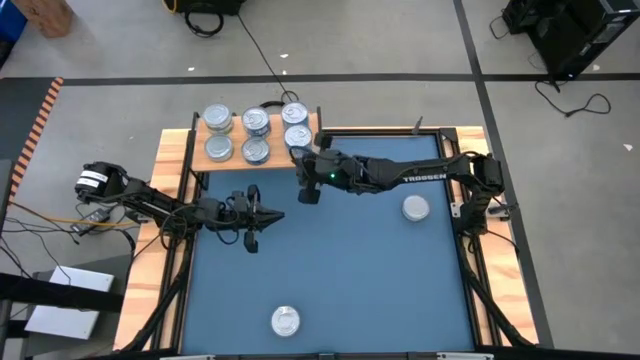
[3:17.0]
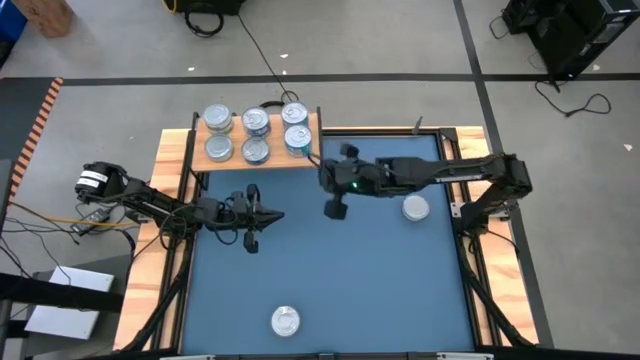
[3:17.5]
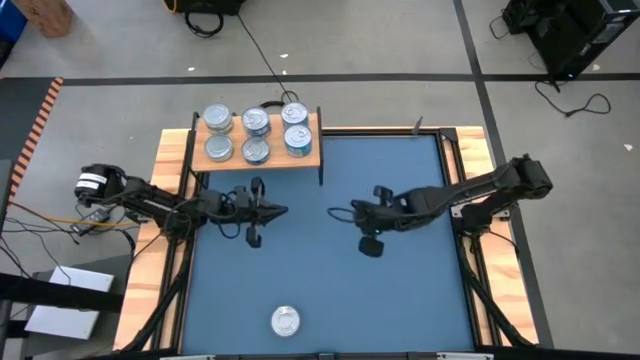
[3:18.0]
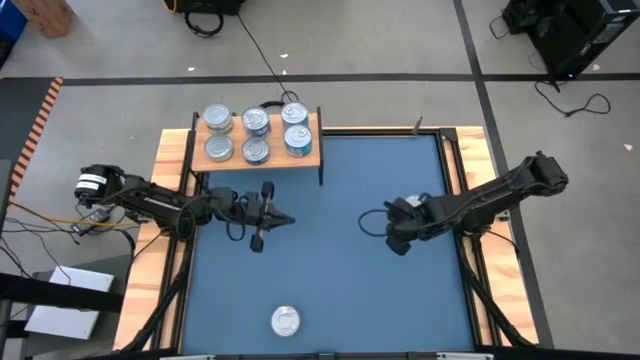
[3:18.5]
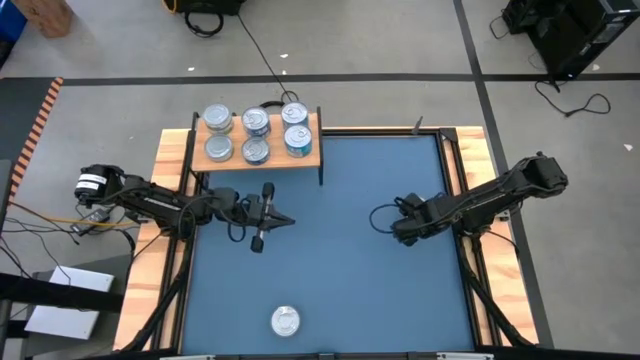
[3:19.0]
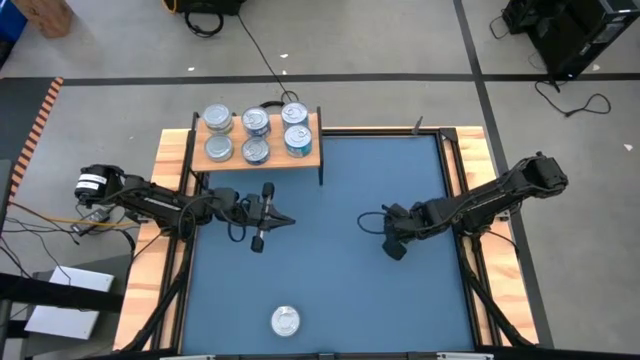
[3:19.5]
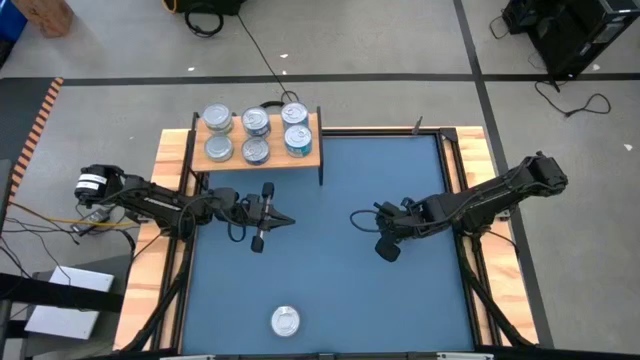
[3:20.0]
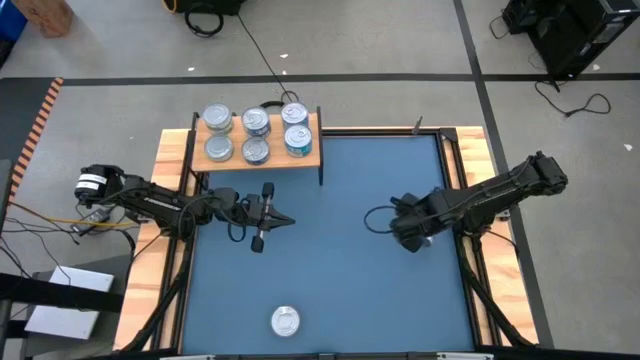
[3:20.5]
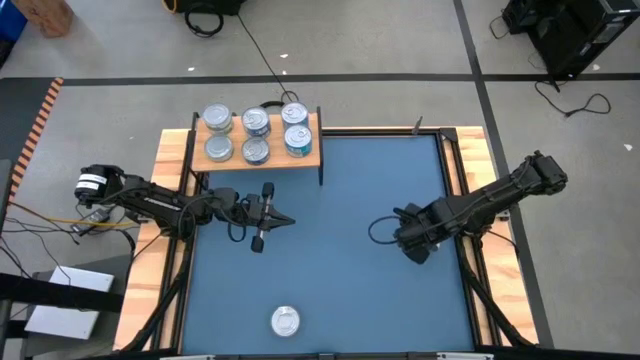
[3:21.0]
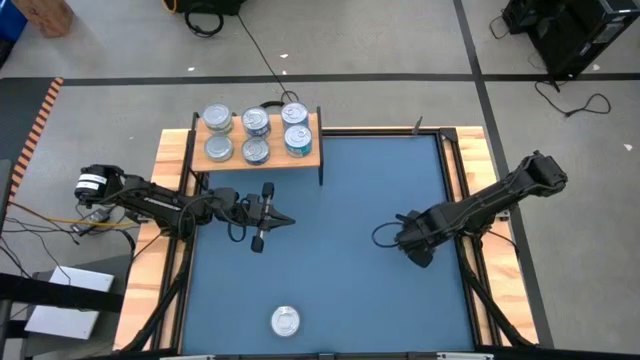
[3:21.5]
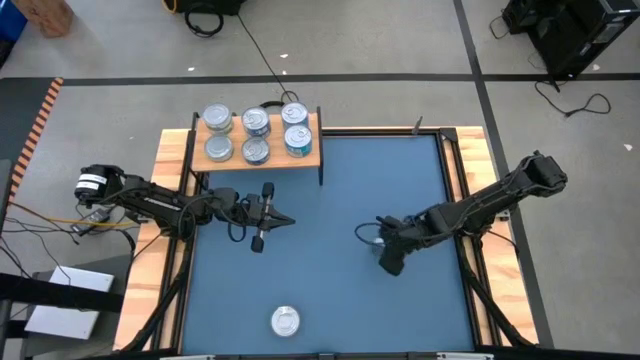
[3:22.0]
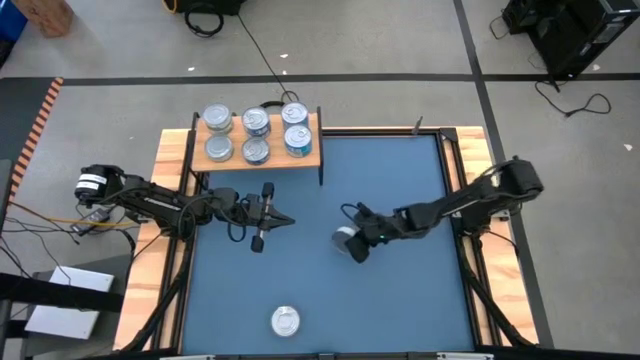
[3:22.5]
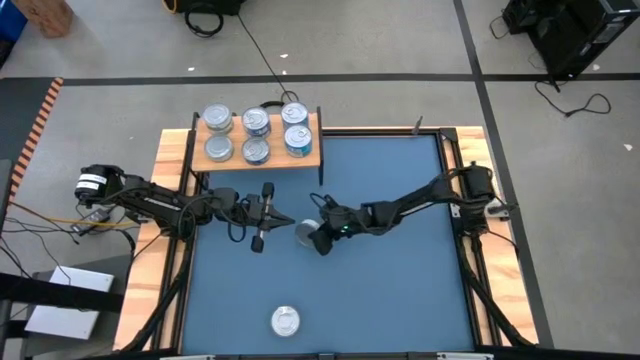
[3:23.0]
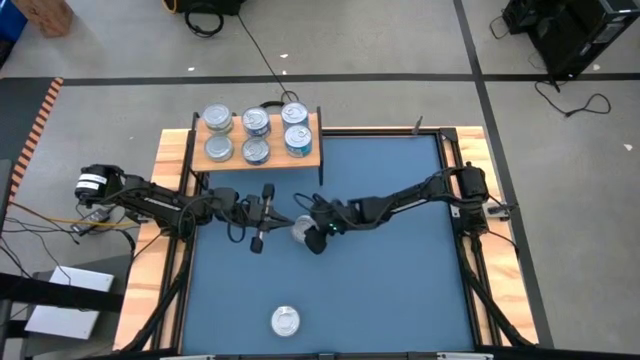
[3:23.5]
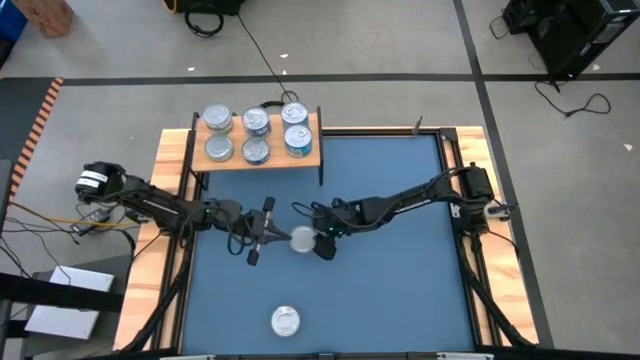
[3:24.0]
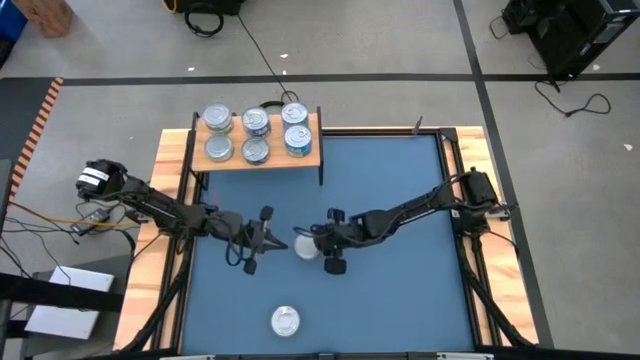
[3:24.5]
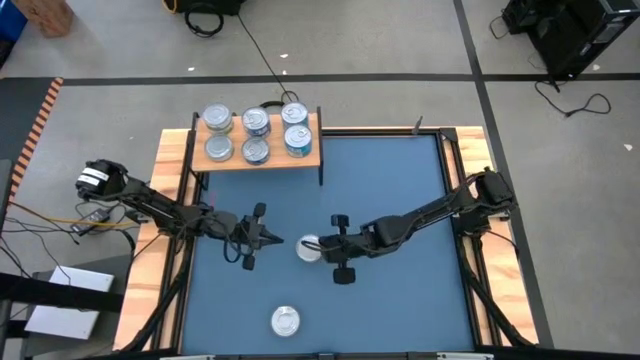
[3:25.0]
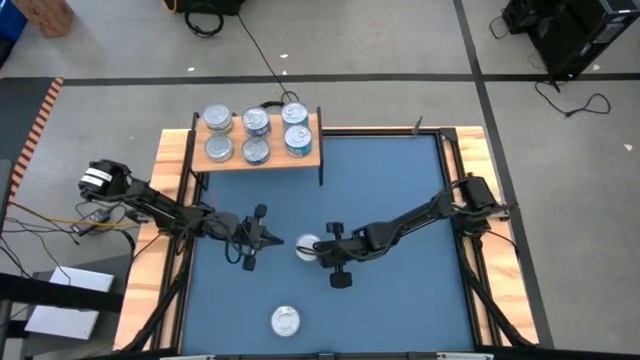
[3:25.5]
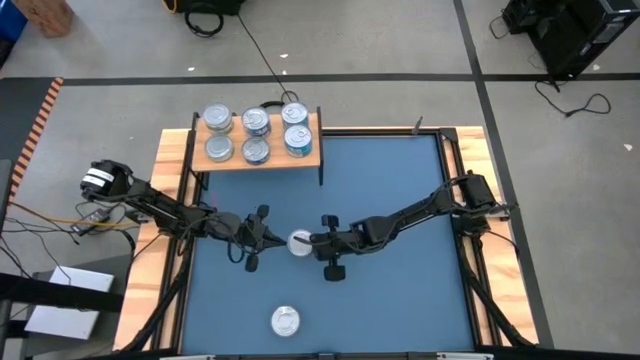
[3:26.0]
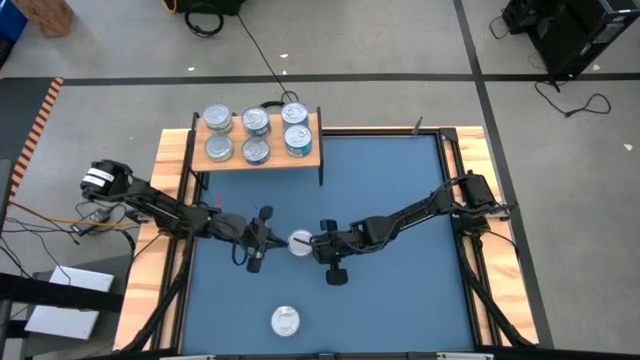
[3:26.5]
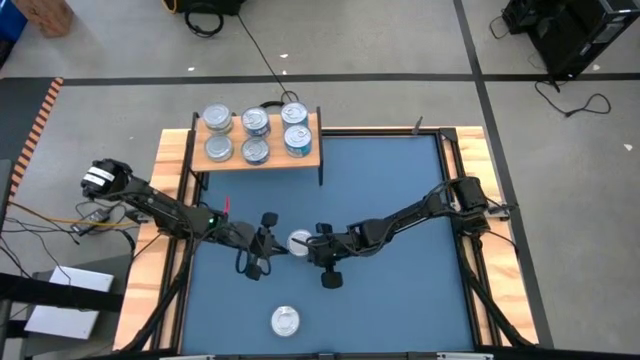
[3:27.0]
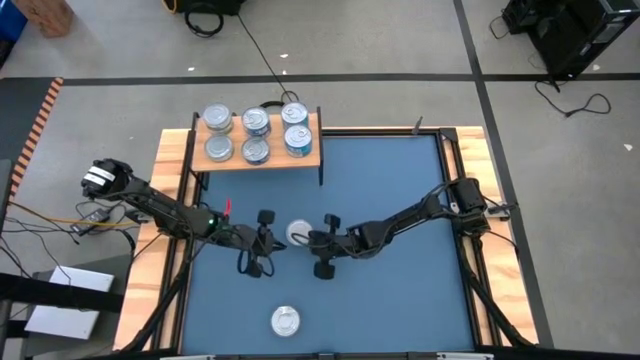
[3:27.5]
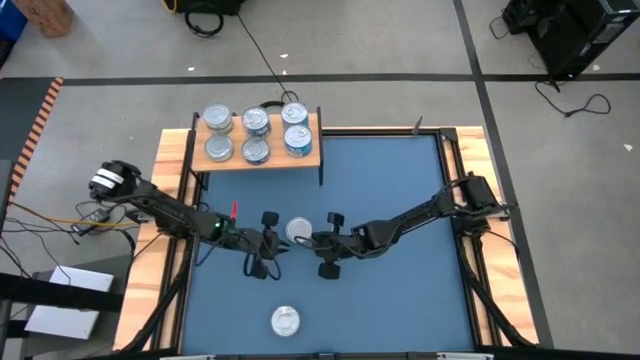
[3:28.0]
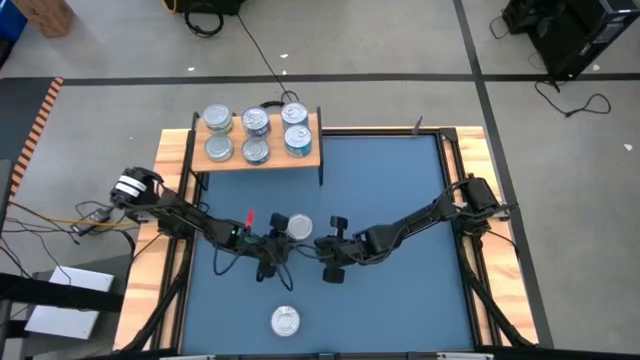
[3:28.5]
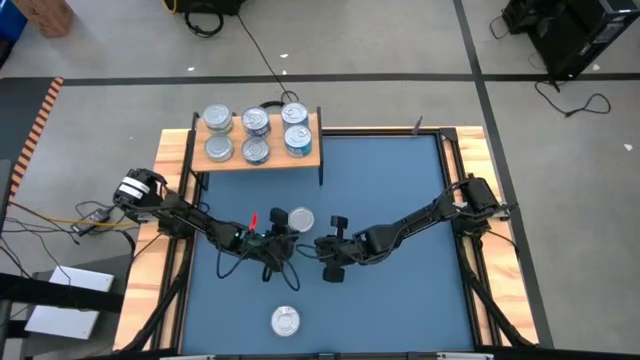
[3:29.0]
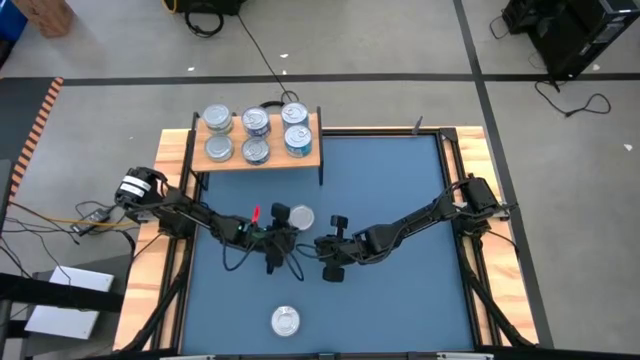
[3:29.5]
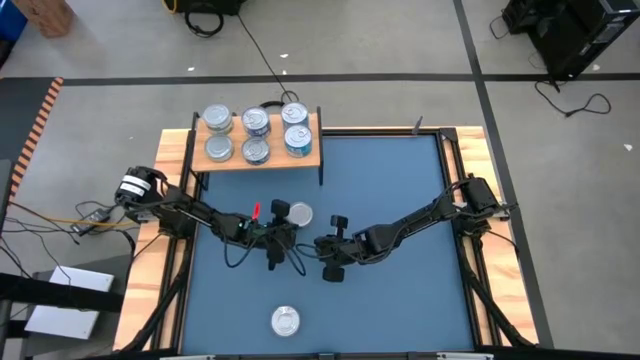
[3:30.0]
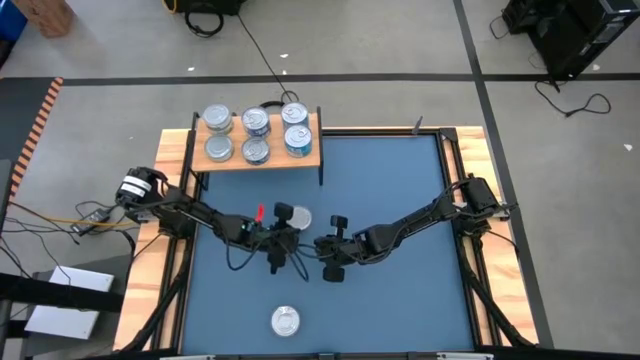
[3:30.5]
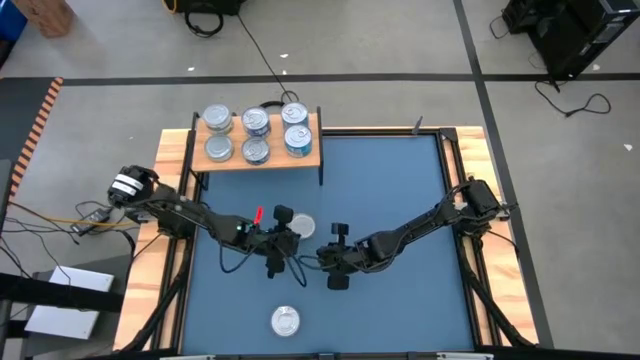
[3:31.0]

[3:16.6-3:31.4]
Task: Stack canned seafood by type on shelf
Stack the green white tuna can on top of the green white tuna can on the shelf

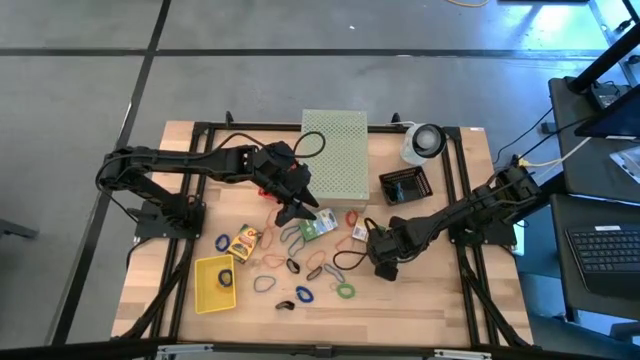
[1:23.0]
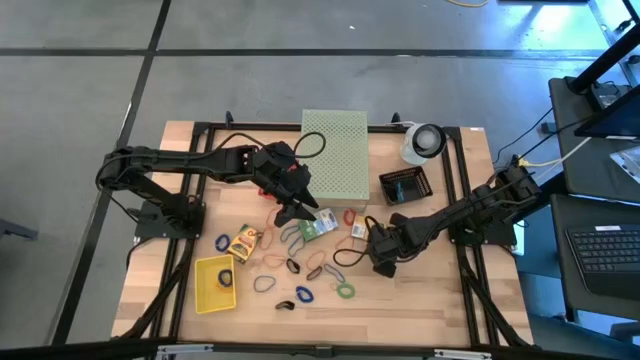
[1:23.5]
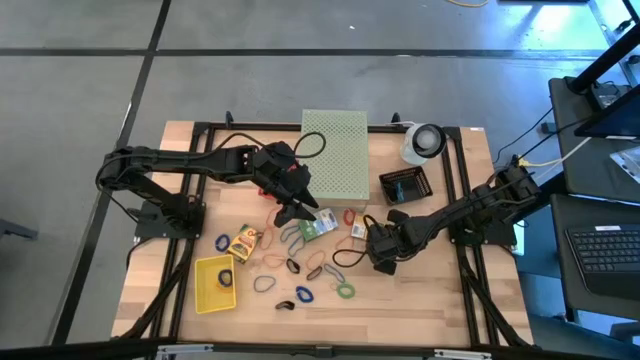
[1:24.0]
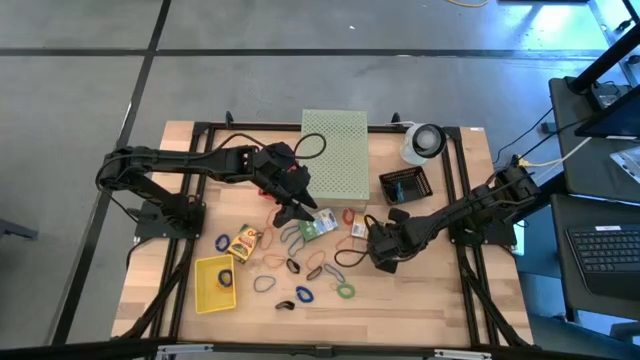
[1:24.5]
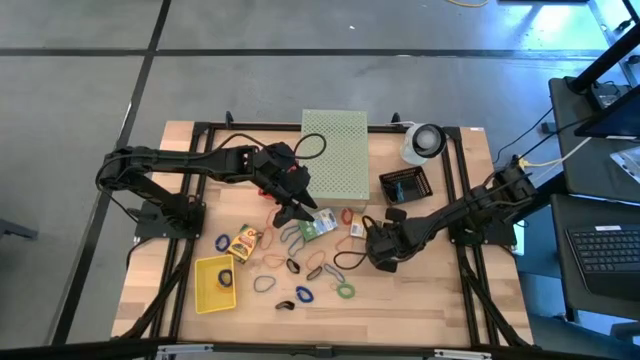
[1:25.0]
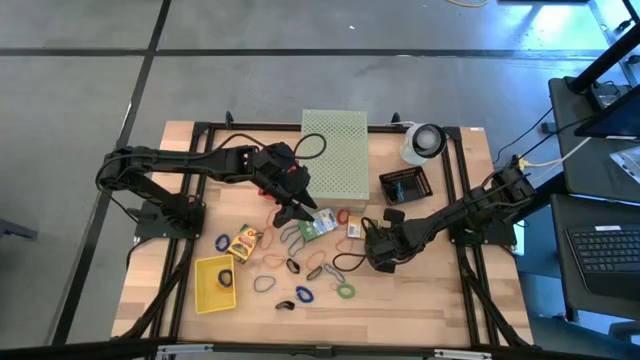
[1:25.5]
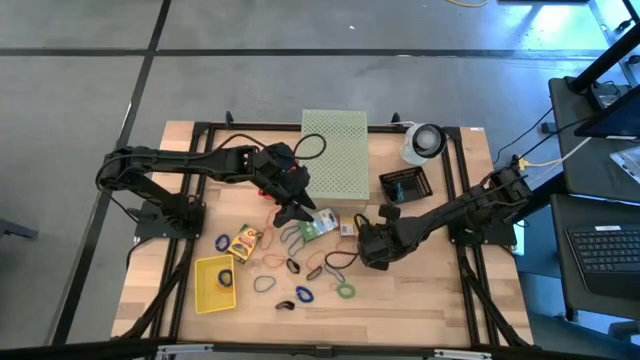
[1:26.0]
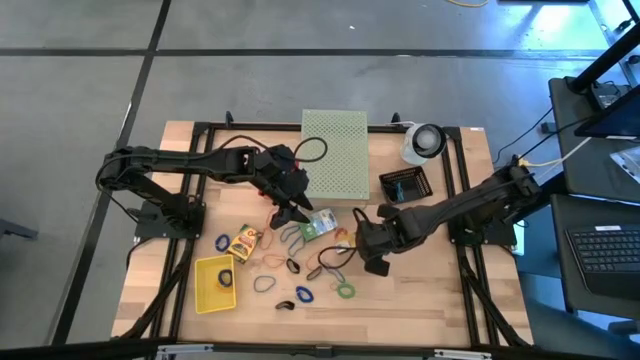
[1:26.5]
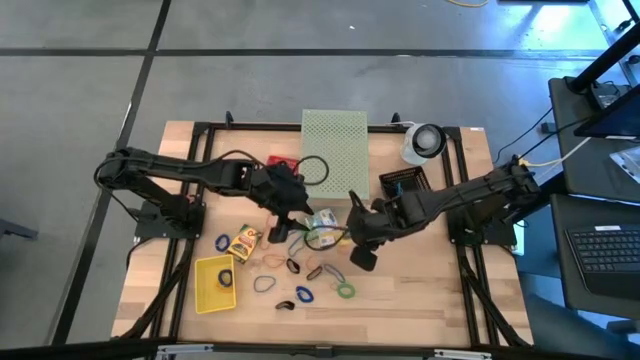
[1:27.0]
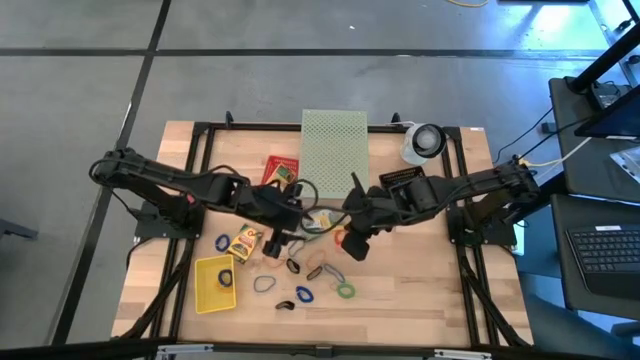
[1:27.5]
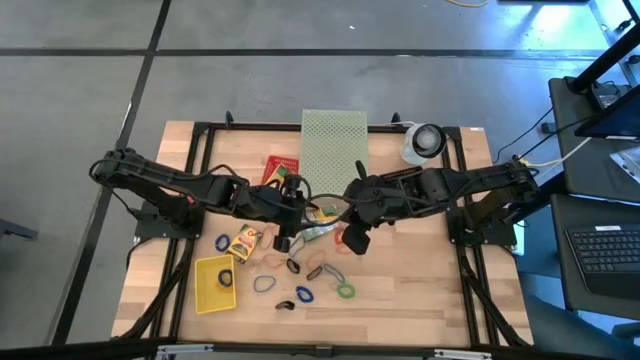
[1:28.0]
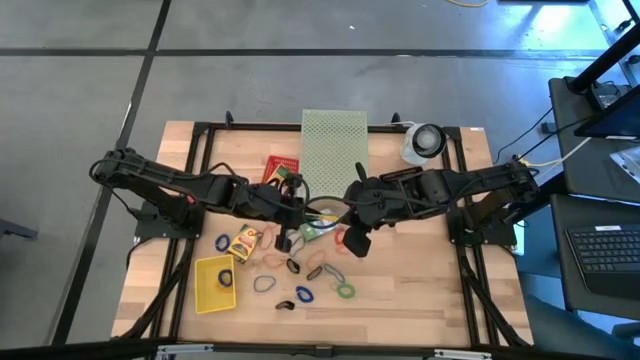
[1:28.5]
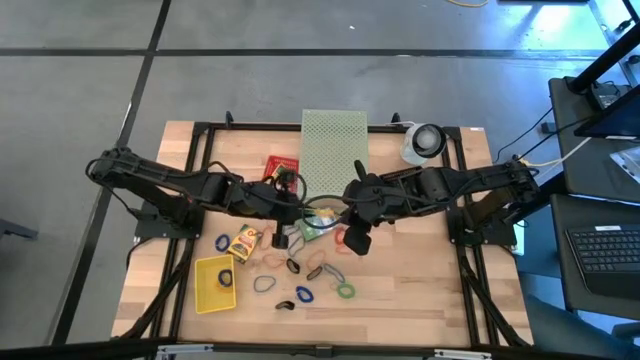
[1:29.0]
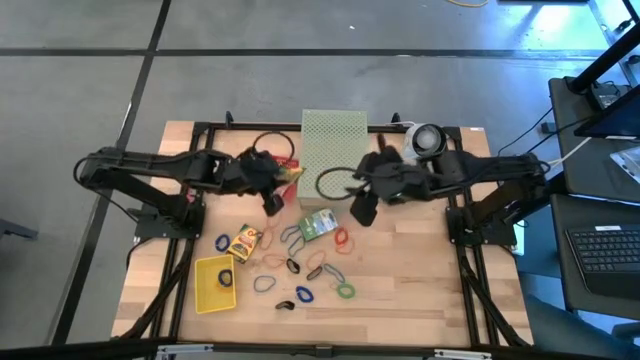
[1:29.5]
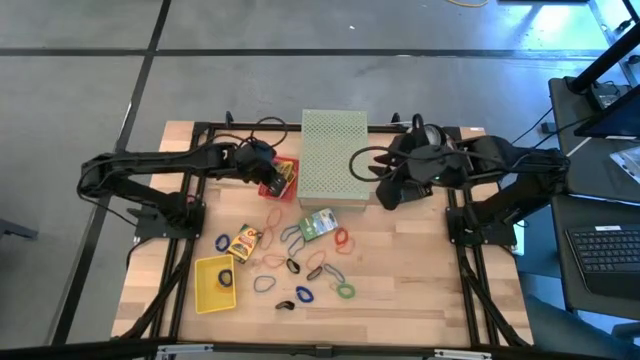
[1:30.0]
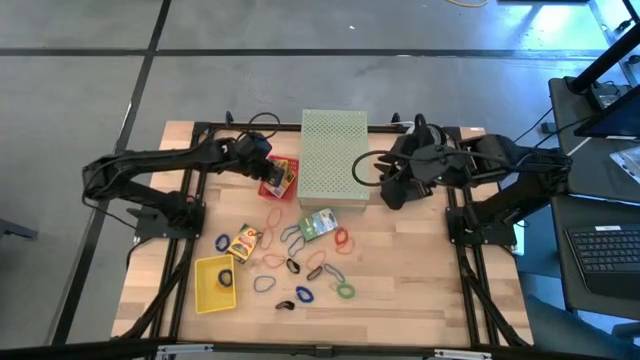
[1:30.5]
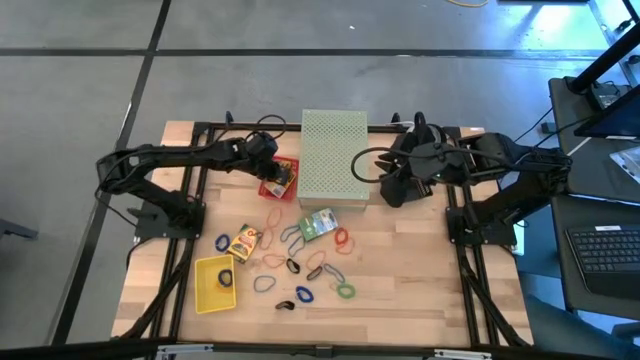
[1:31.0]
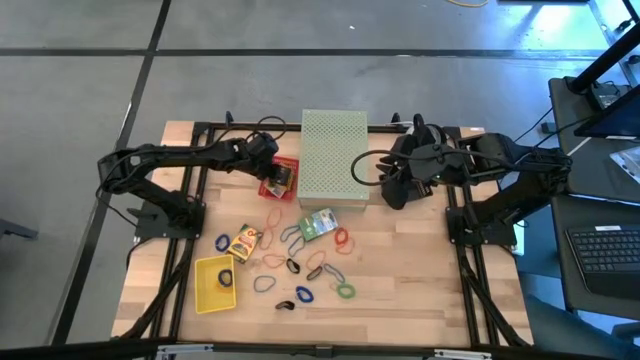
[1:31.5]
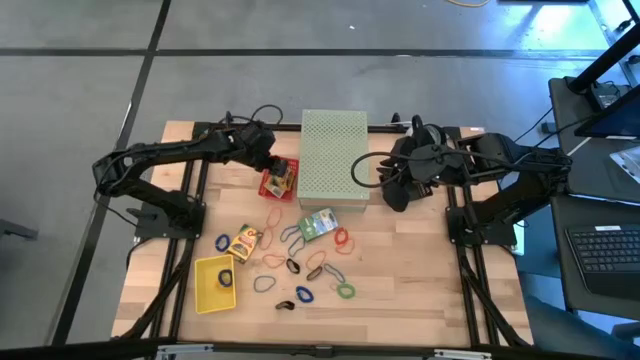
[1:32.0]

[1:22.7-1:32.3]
Task: Pick & Place Office Desk Supplies
Put the crayola box into the orange bin
